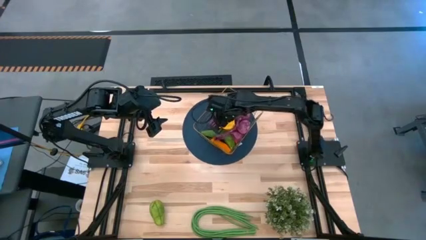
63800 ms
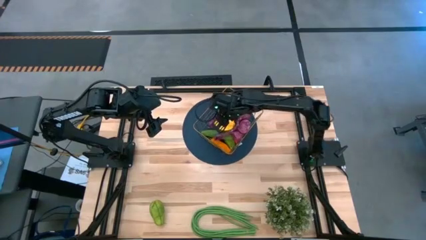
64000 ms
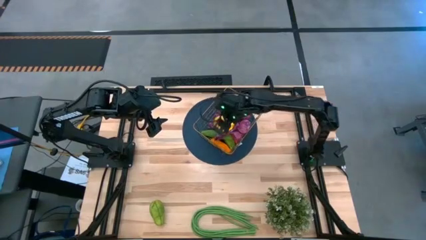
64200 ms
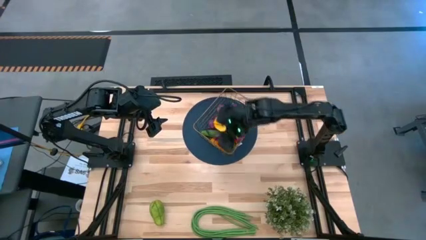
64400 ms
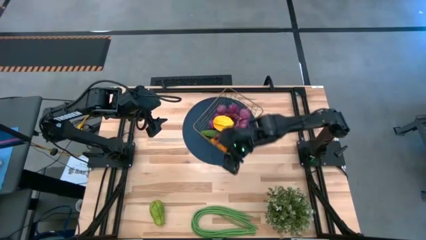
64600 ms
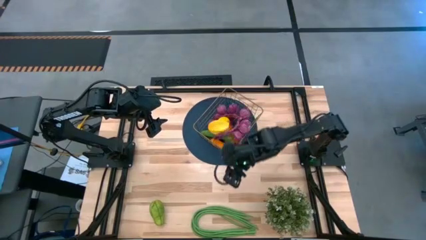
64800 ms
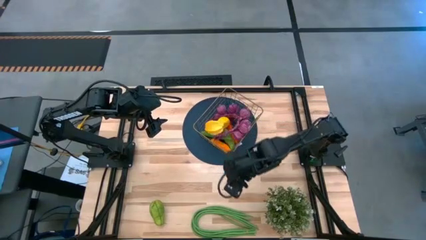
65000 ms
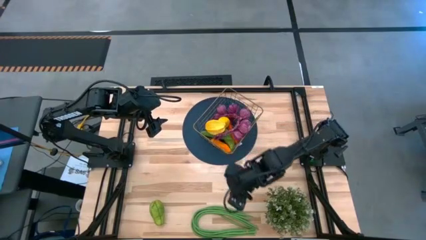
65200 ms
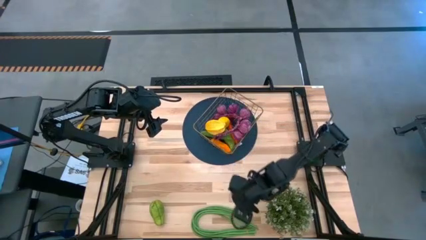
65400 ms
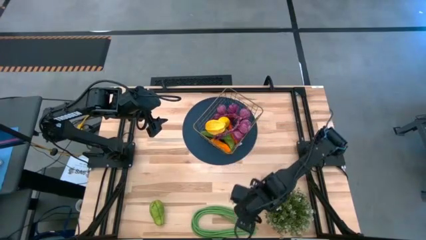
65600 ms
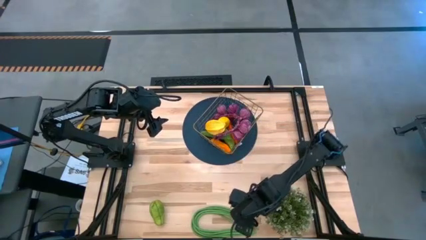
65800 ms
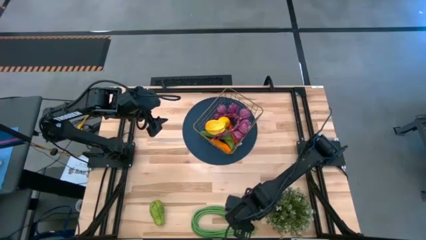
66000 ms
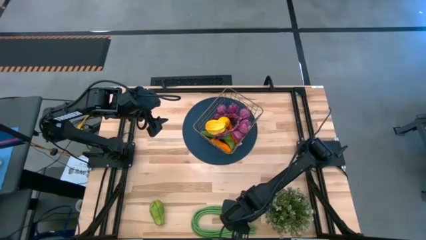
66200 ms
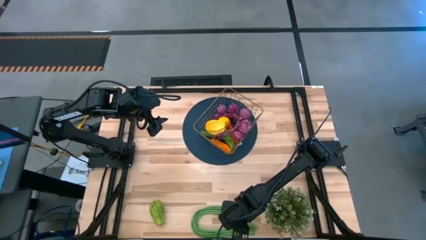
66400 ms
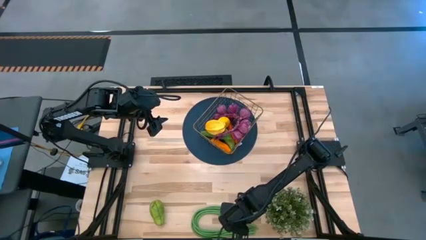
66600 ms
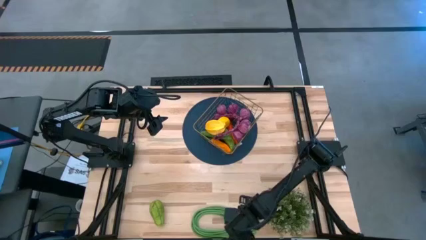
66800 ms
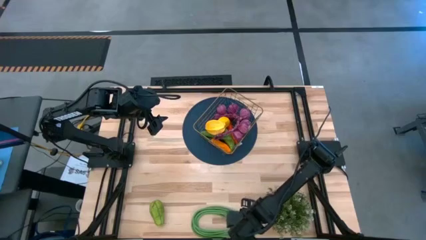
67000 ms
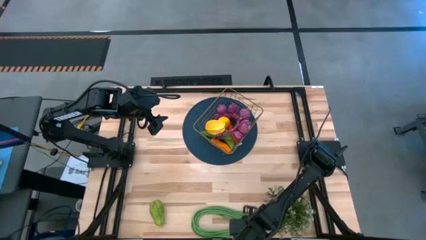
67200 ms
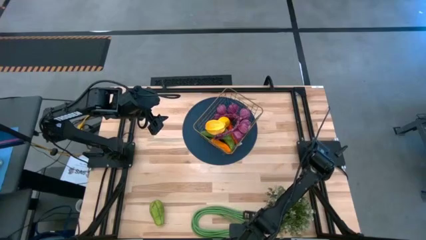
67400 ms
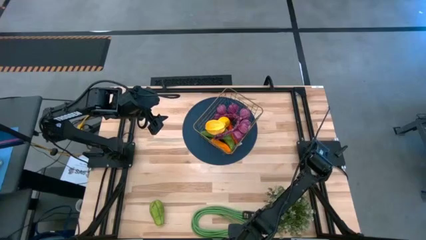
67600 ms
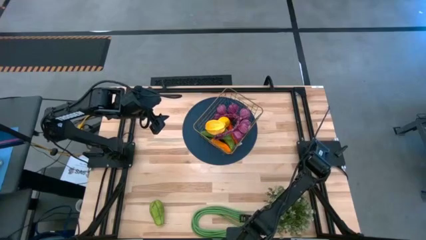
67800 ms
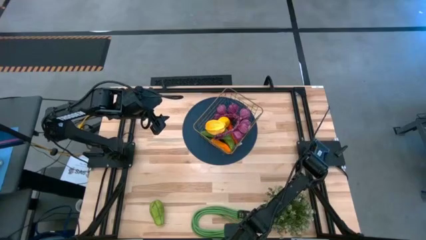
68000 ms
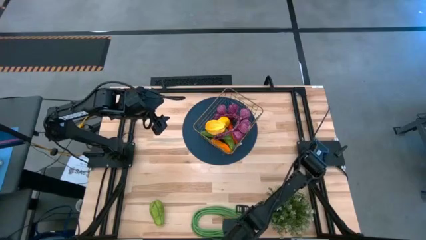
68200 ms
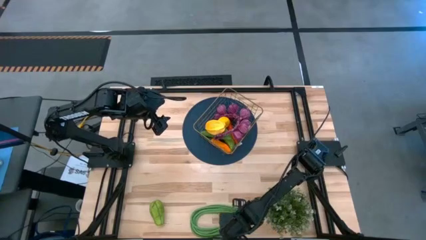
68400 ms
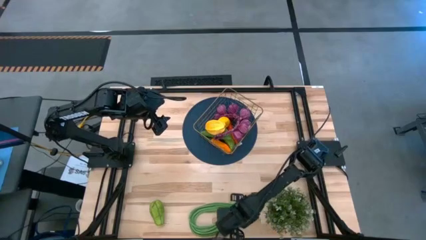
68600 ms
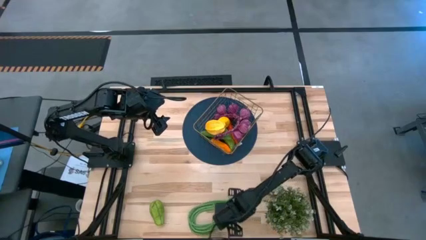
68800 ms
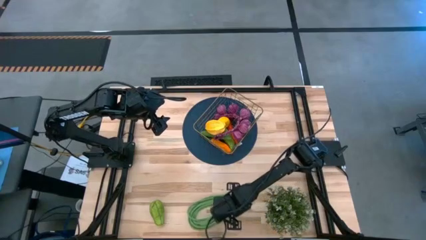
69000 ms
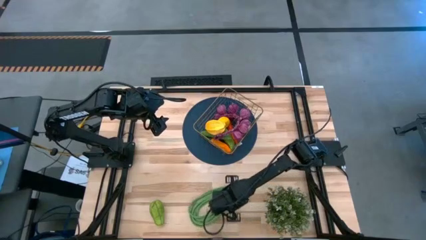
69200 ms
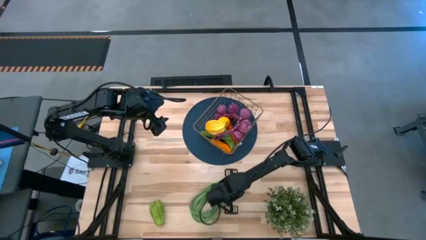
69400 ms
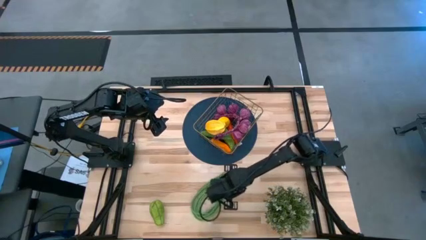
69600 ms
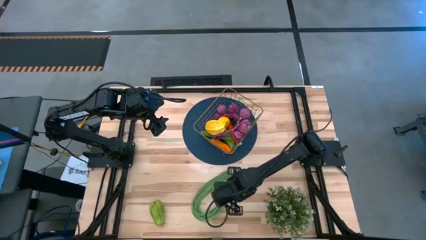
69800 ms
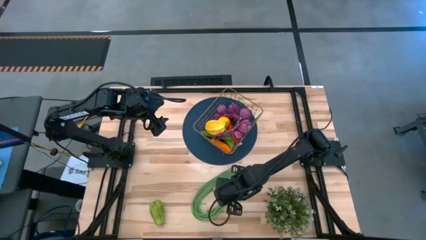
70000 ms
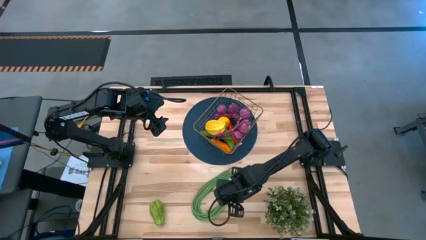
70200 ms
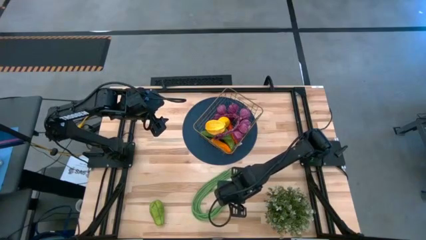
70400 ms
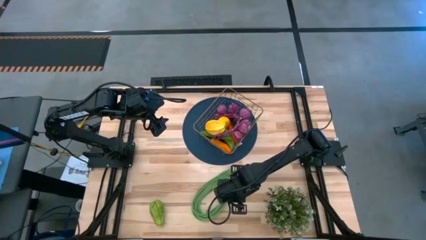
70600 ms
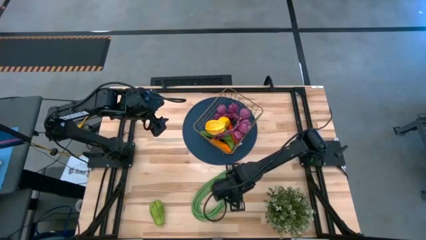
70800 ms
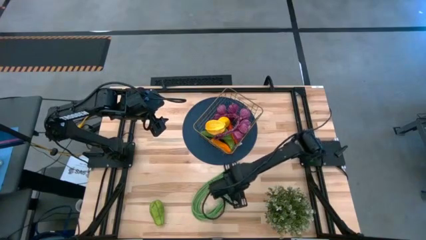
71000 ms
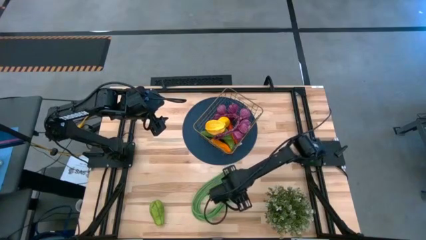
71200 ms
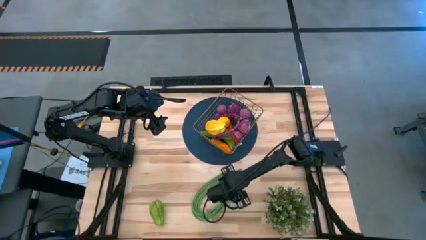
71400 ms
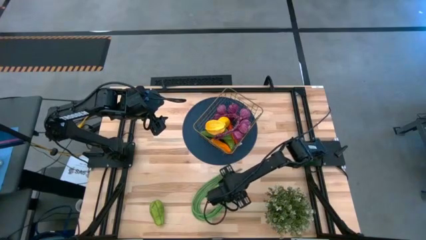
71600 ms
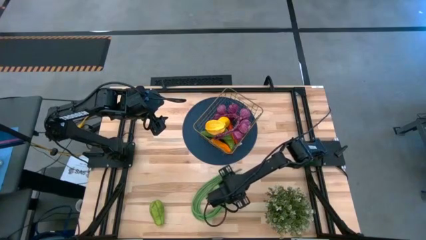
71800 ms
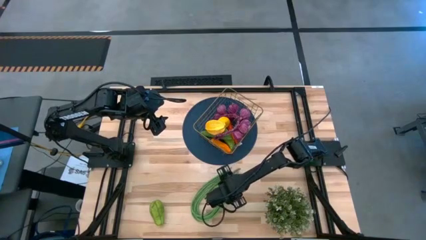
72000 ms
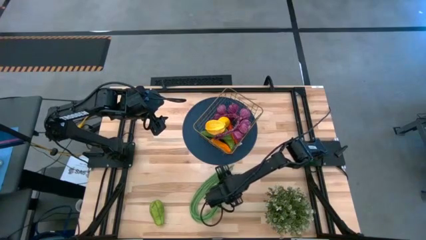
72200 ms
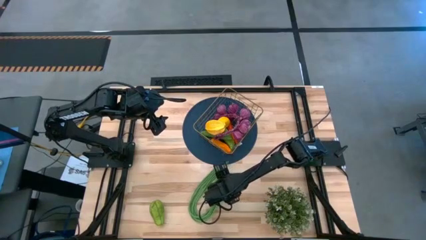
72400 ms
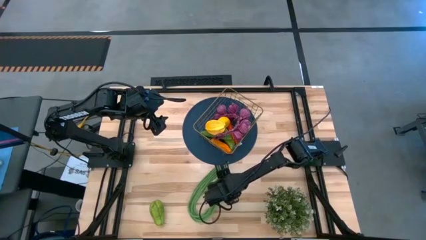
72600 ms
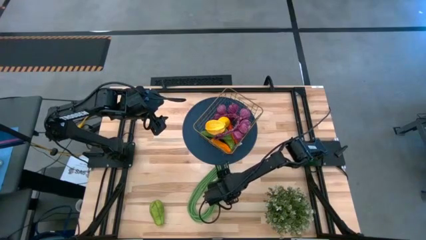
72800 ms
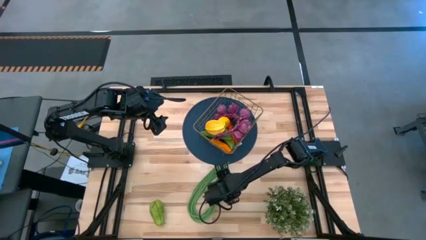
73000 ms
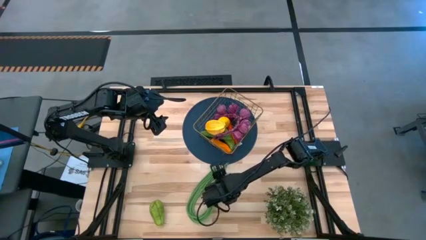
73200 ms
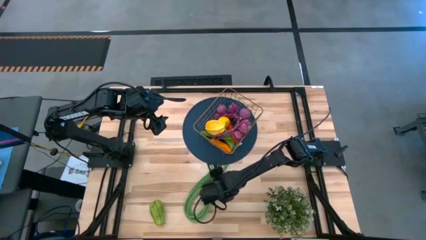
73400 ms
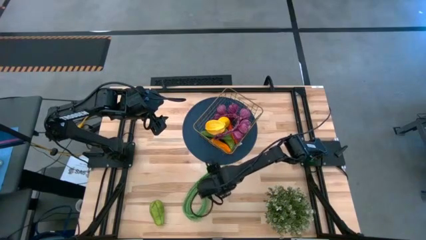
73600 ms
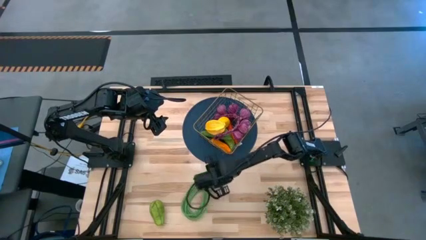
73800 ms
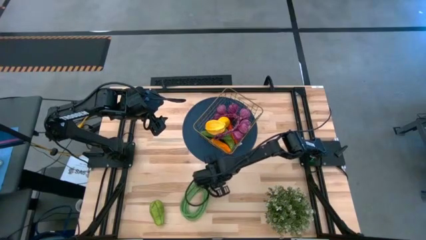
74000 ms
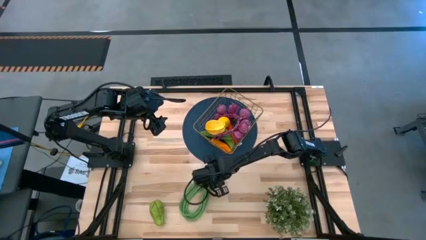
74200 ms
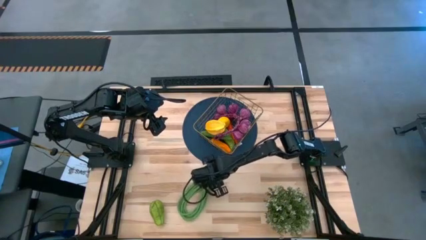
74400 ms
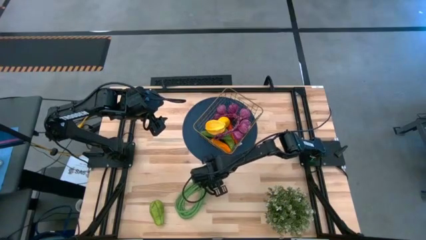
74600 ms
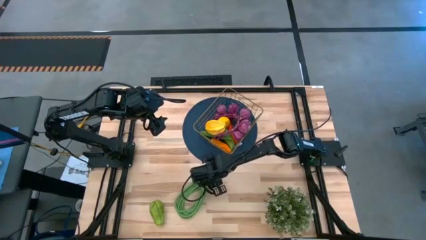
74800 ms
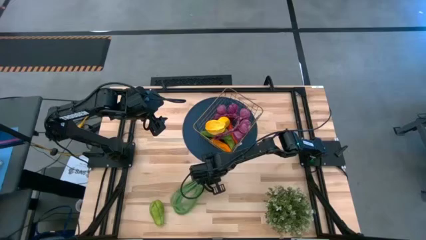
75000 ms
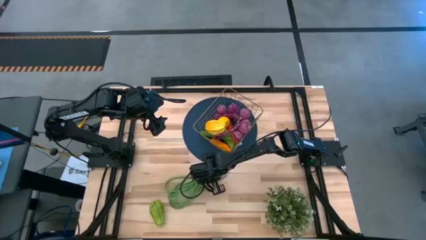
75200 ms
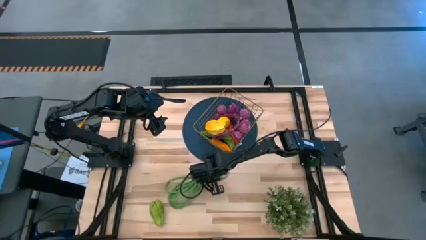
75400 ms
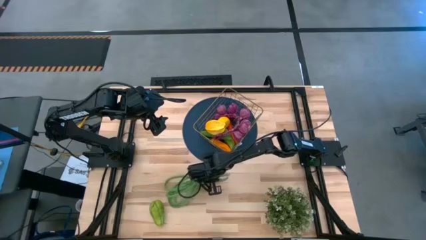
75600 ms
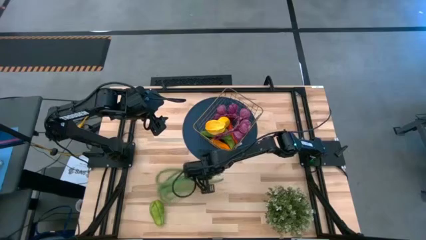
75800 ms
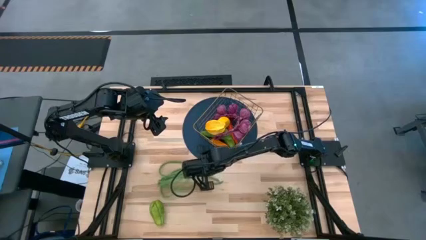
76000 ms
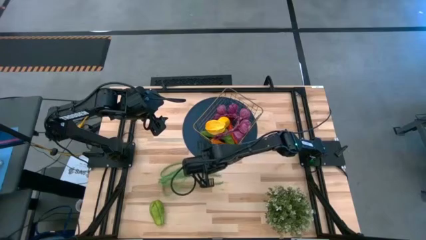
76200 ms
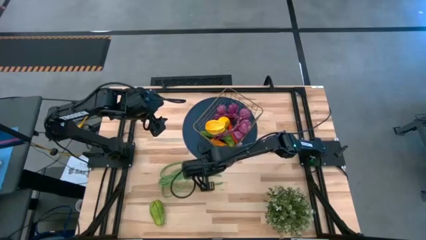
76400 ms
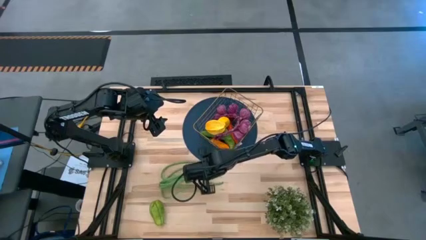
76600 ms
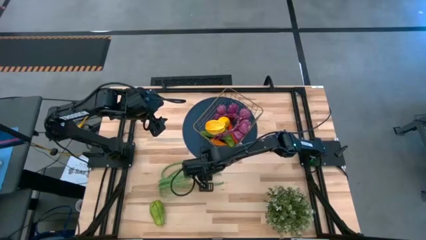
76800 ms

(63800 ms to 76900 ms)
Task: Build produce basket
Put the string beans into the wire basket

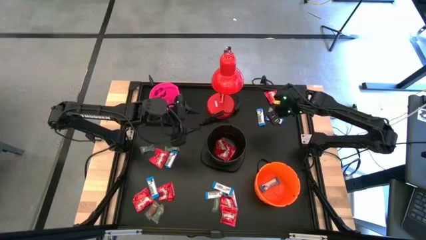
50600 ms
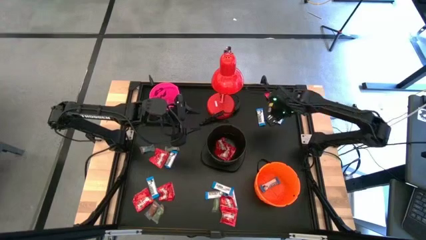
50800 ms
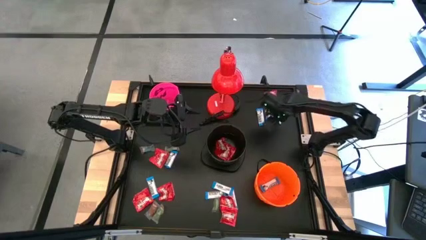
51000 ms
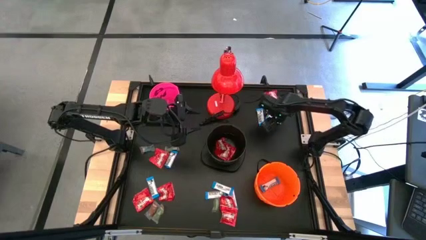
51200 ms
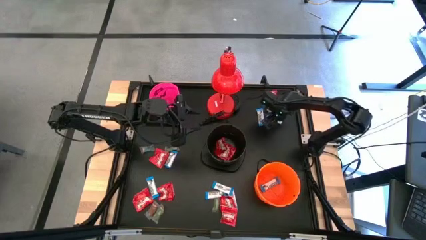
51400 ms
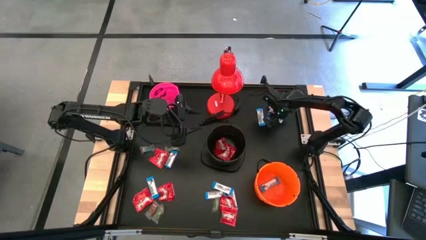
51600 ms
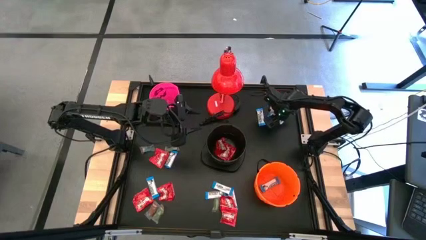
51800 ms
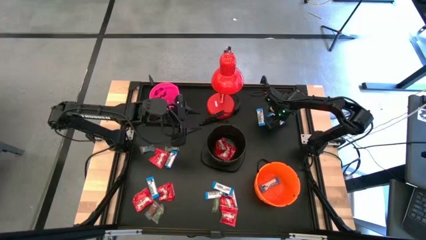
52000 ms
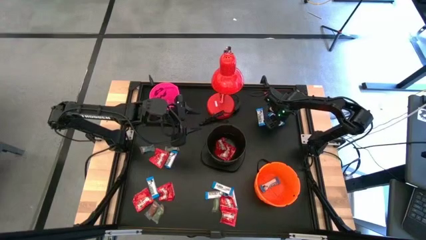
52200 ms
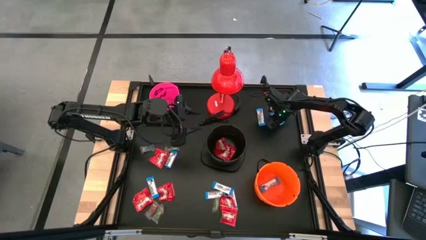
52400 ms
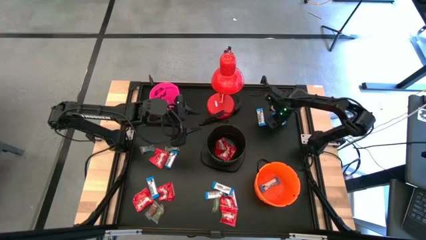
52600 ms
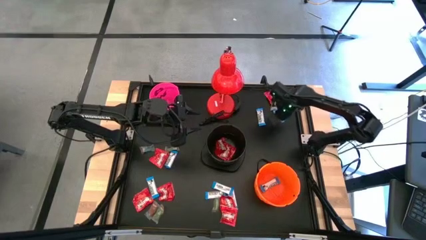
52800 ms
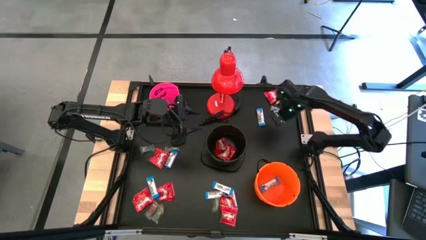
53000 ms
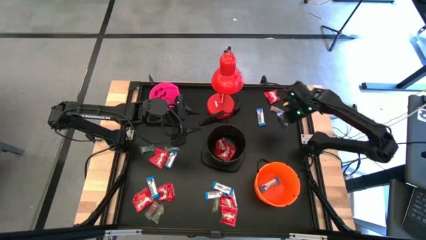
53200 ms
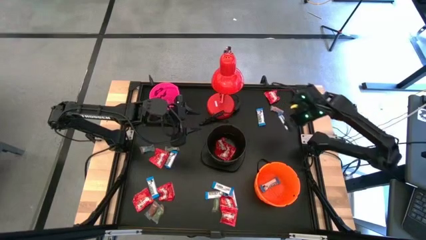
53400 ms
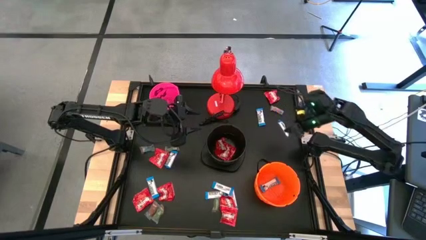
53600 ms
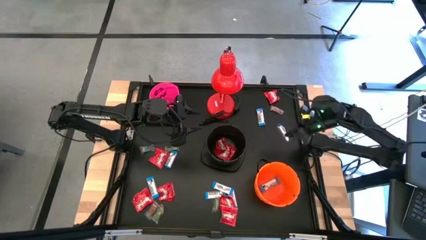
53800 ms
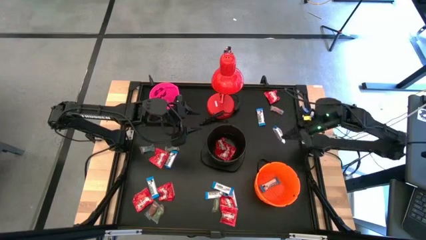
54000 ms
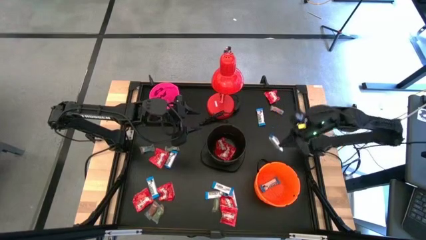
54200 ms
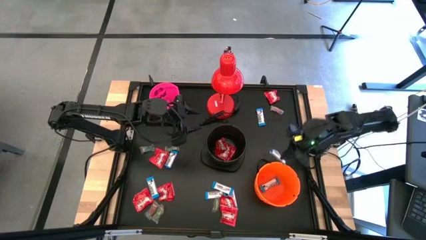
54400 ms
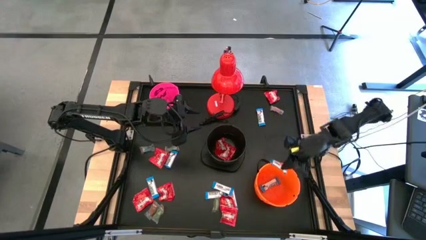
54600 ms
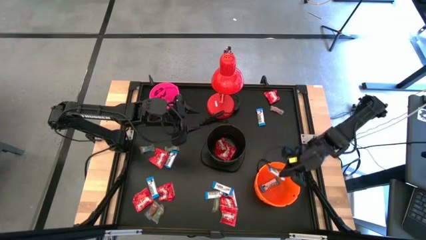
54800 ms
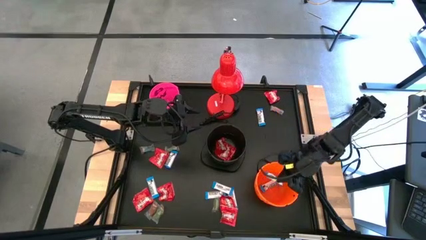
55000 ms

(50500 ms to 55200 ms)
Task: Organize candy in baskets
Put the white chocolate into the orange bucket
